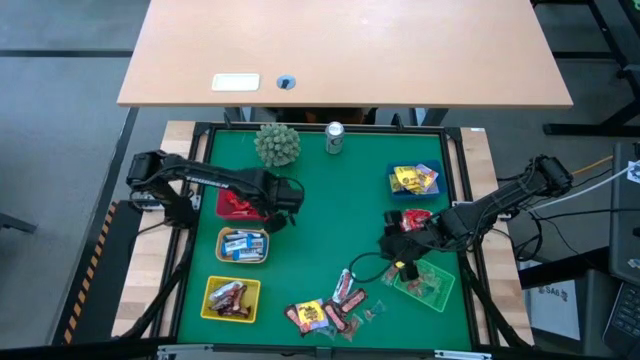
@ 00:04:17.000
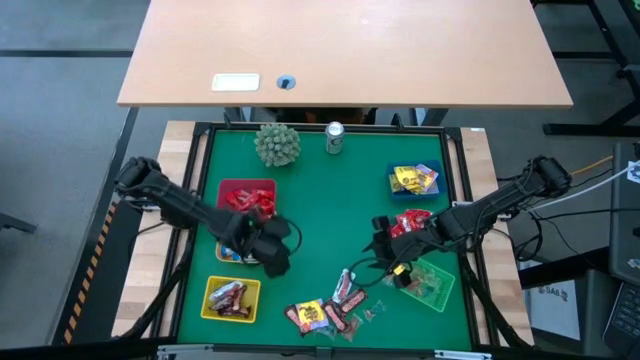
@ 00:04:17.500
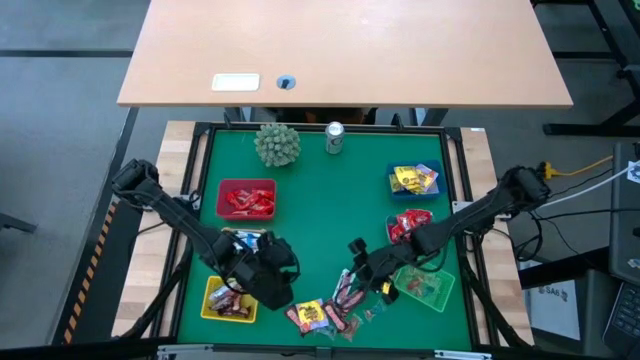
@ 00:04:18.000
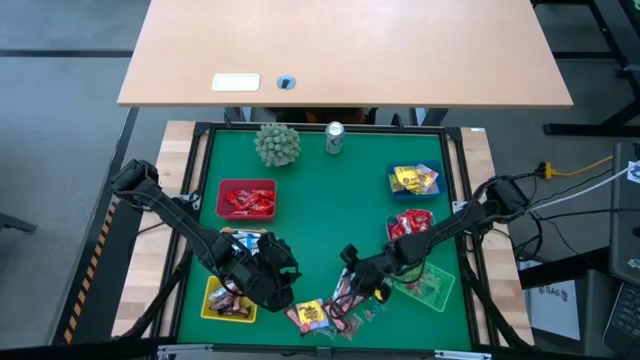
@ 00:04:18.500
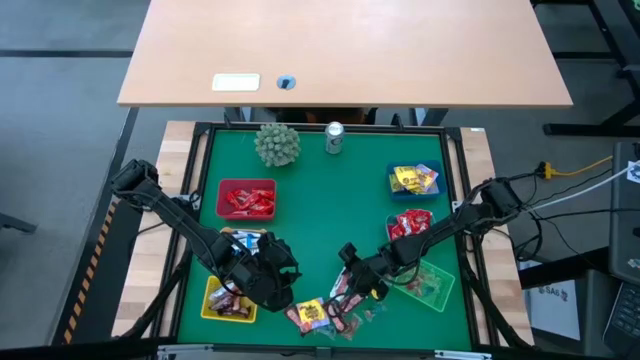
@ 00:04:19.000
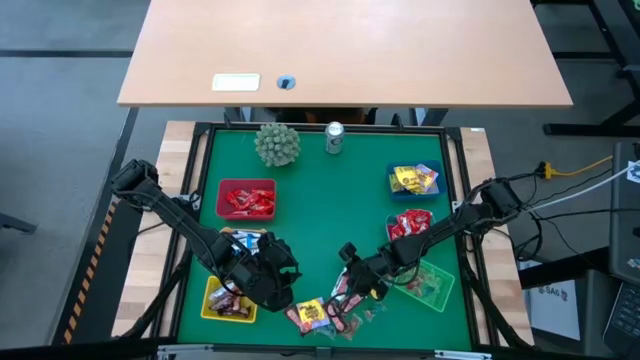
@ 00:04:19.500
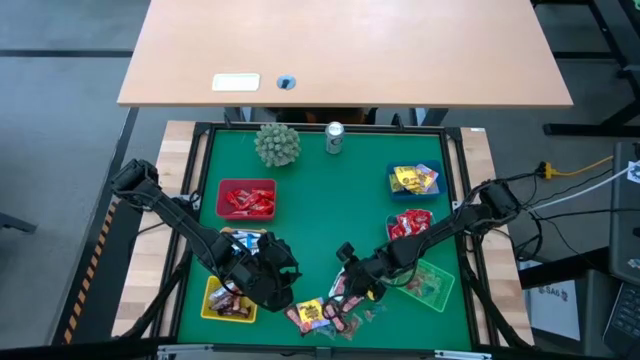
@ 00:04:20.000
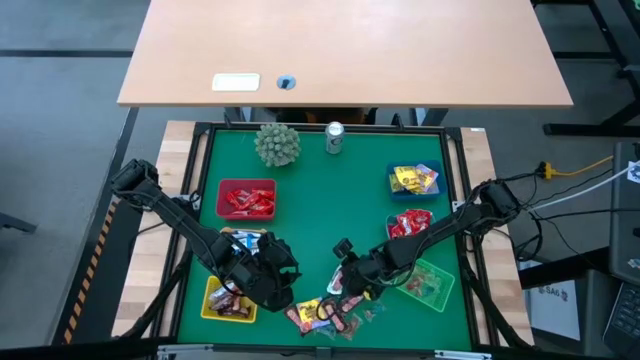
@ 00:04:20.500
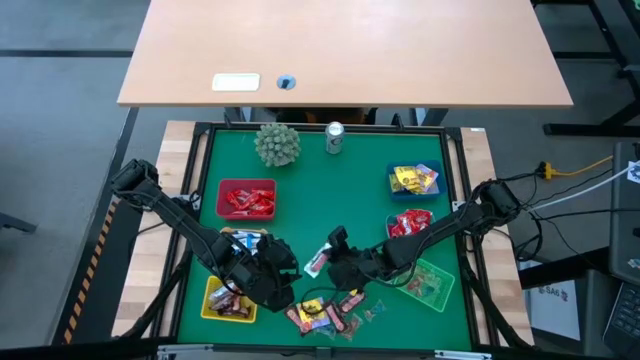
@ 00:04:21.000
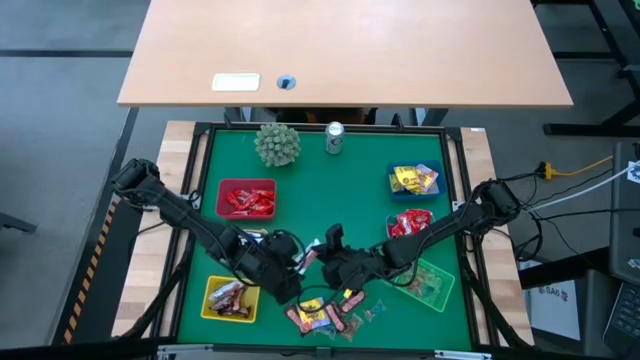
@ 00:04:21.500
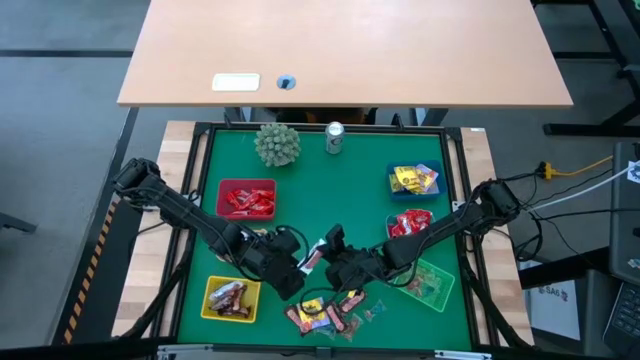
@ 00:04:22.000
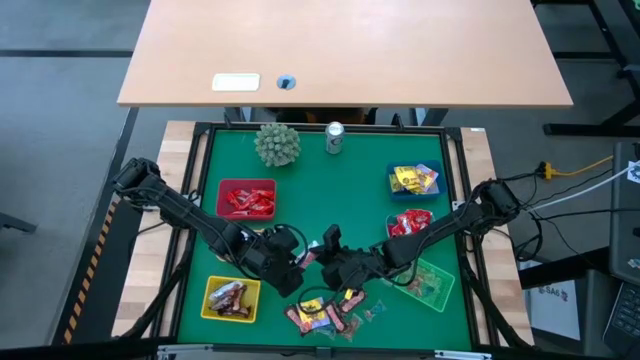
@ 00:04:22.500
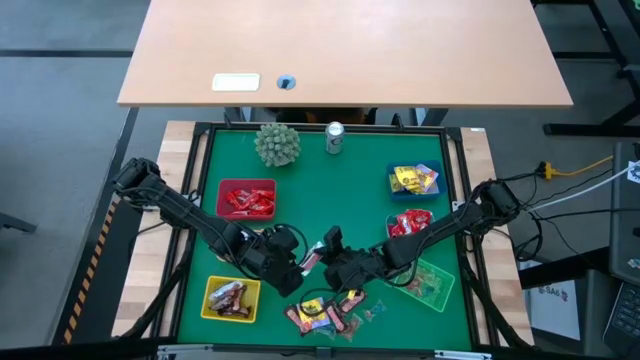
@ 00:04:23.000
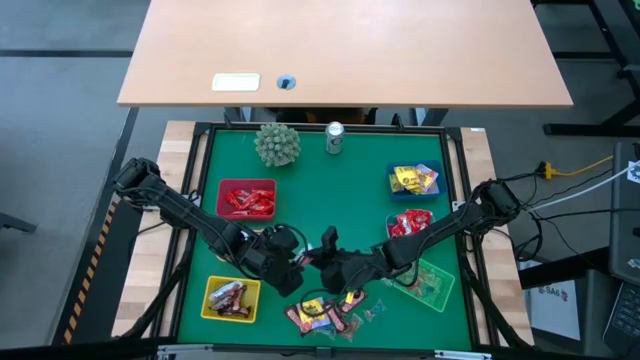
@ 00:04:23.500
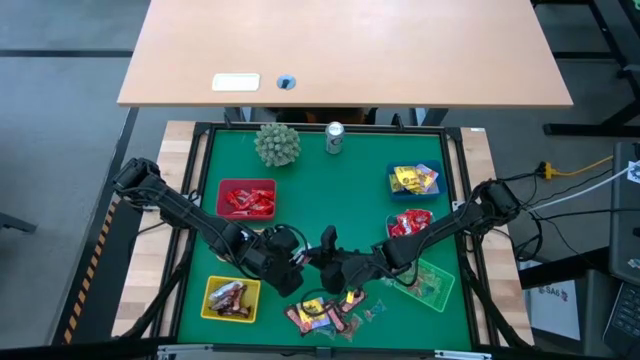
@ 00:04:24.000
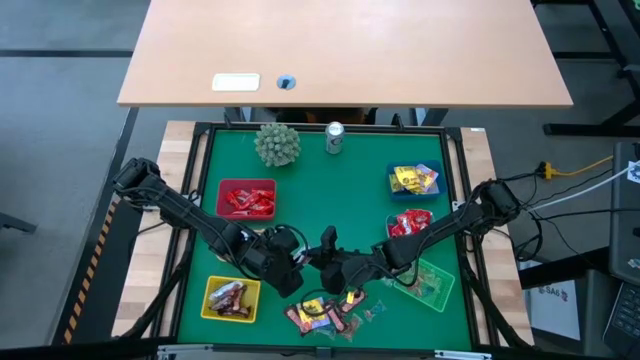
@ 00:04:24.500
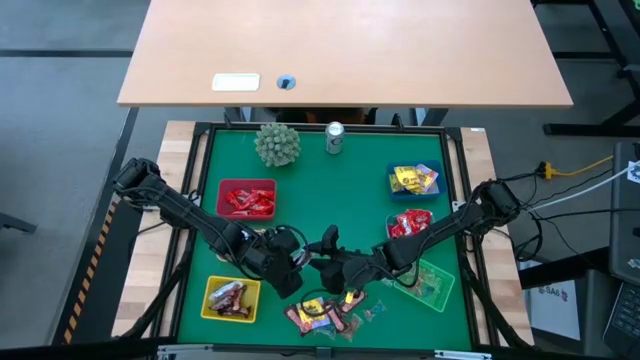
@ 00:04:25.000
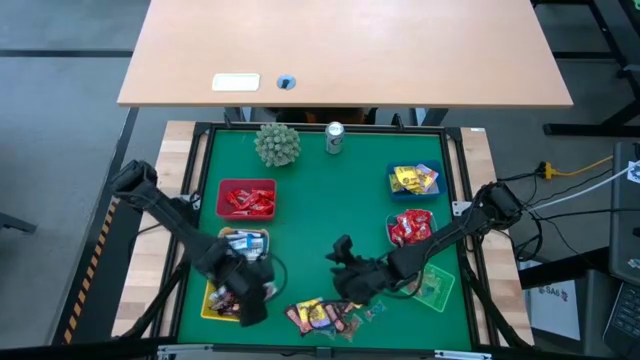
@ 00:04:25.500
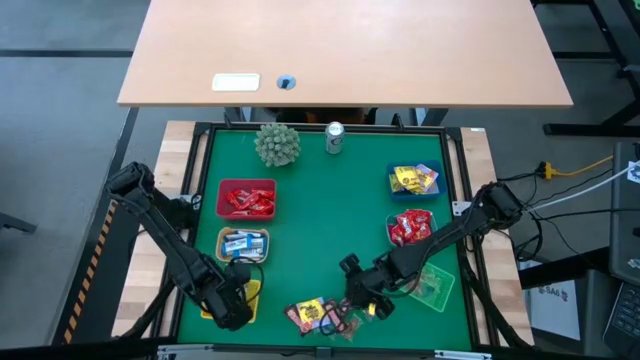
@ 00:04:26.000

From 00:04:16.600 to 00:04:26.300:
Task: Sort candy
Put the white-red chocolate bar into the yellow bin

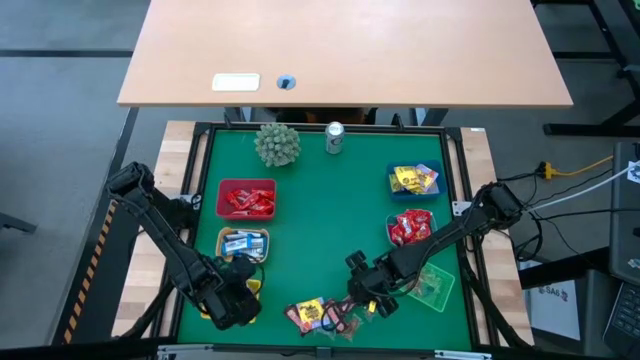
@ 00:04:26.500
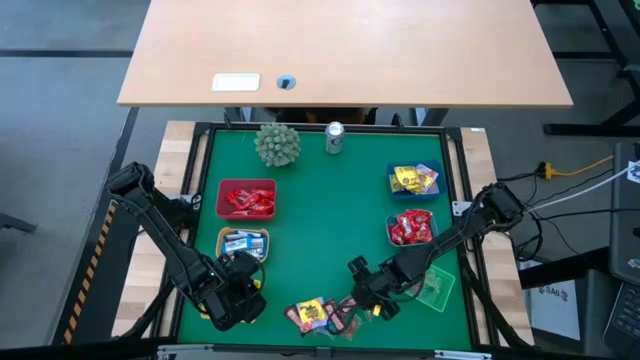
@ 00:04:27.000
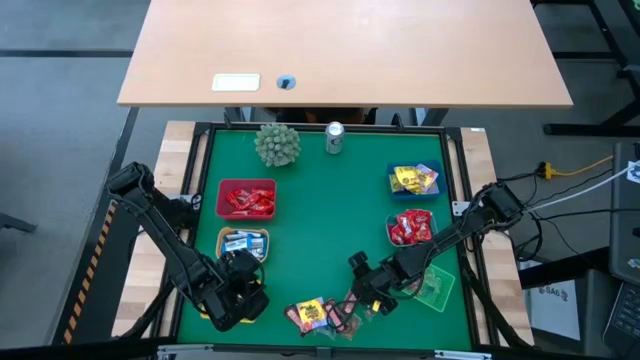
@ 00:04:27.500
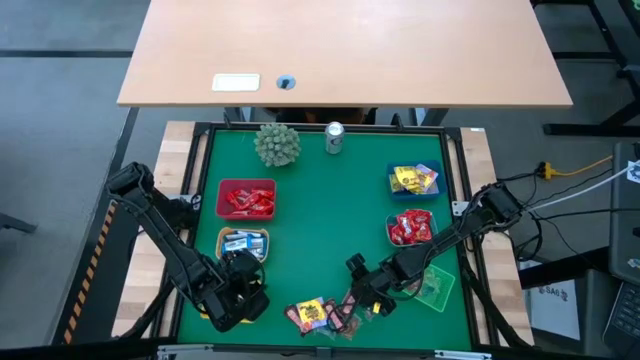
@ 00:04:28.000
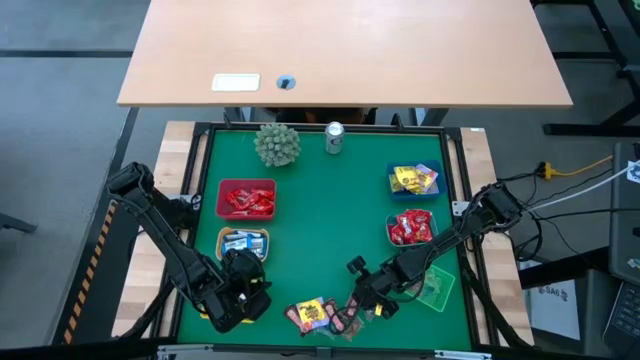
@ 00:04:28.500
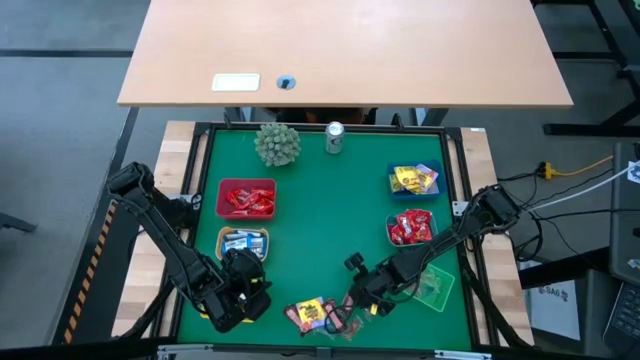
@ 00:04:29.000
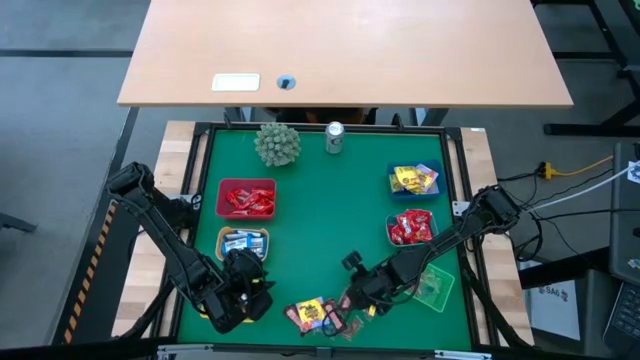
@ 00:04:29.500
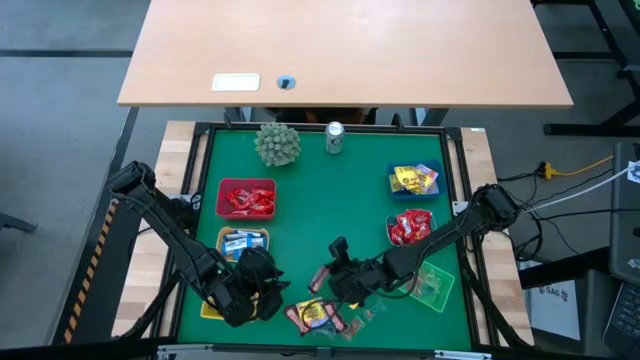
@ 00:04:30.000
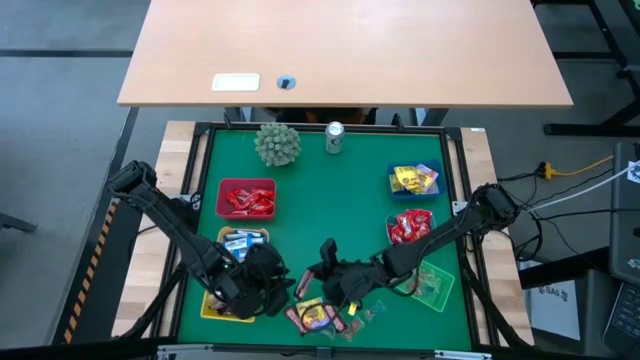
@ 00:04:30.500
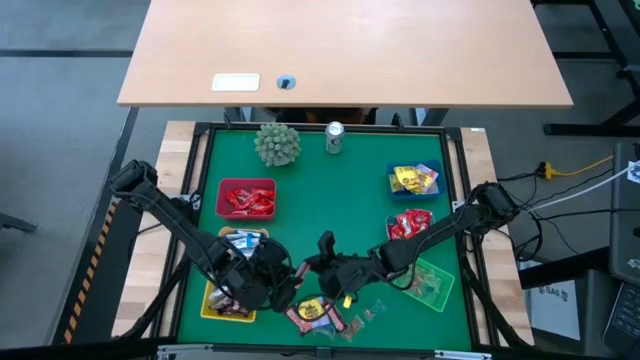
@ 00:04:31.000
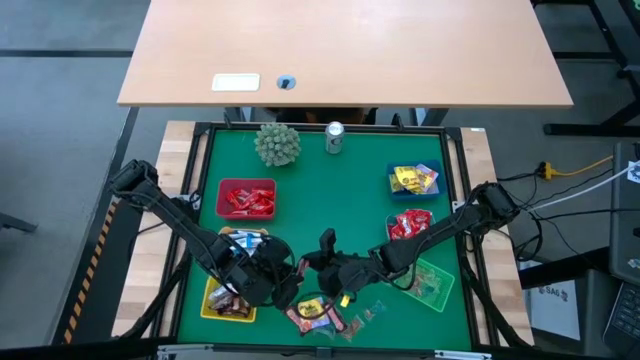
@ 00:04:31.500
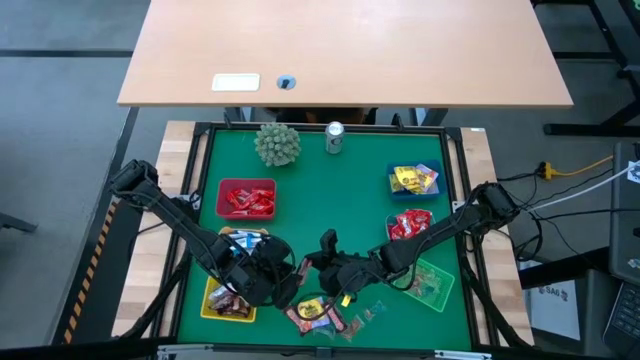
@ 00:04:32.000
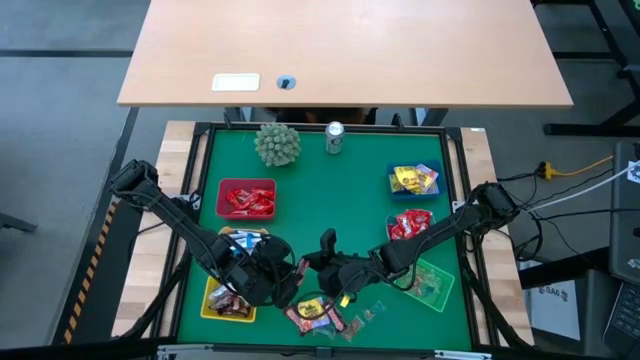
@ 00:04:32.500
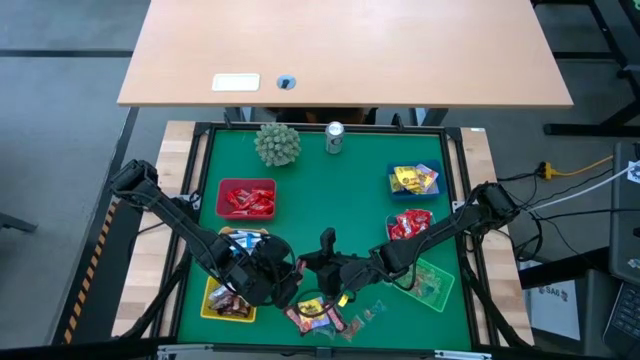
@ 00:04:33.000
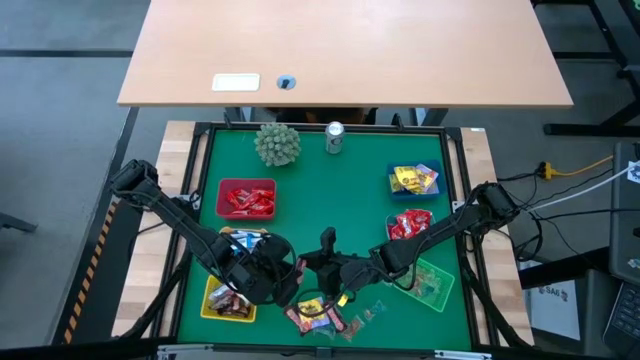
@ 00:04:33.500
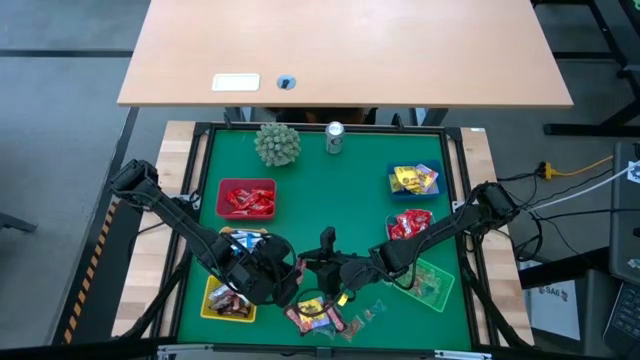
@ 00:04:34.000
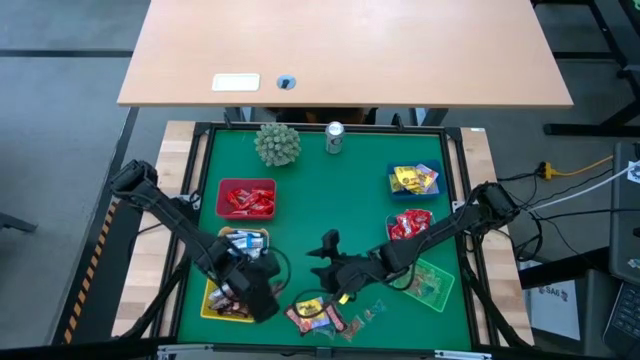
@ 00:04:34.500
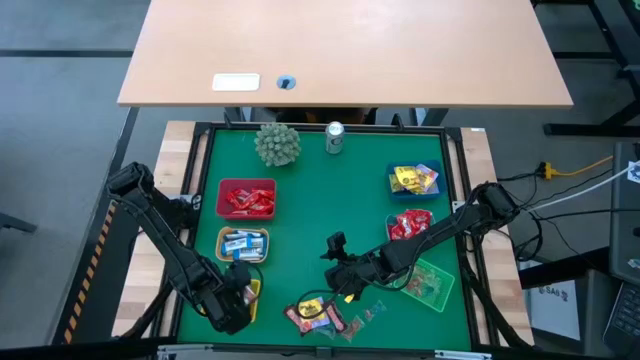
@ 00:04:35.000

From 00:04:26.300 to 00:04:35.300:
Put the brown chocolate bar into the yellow bin

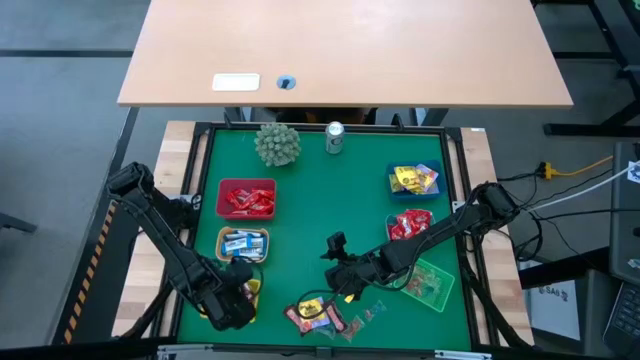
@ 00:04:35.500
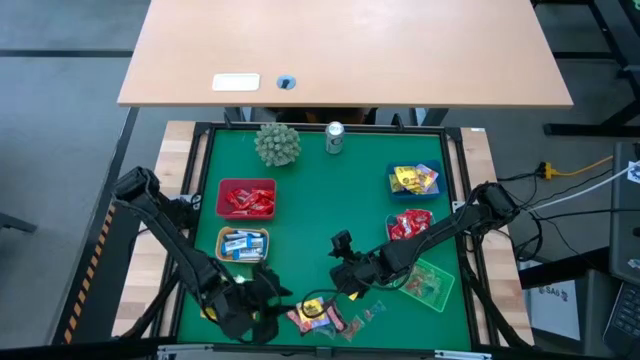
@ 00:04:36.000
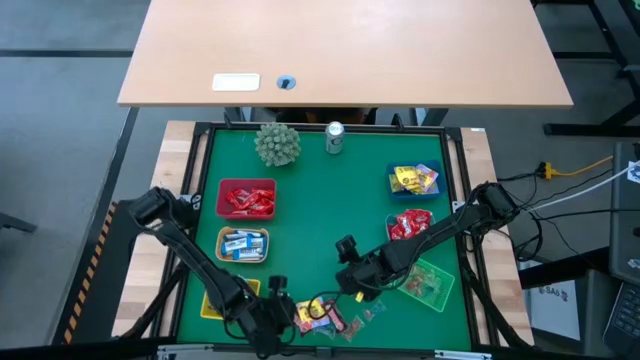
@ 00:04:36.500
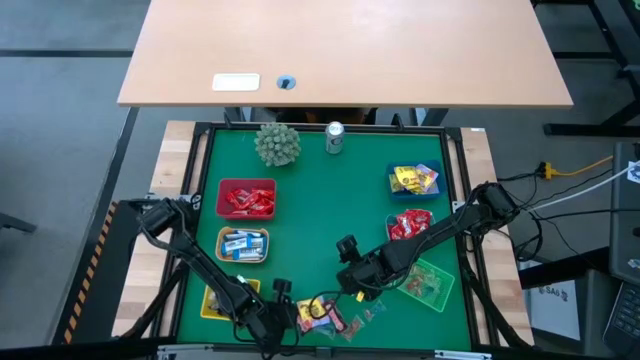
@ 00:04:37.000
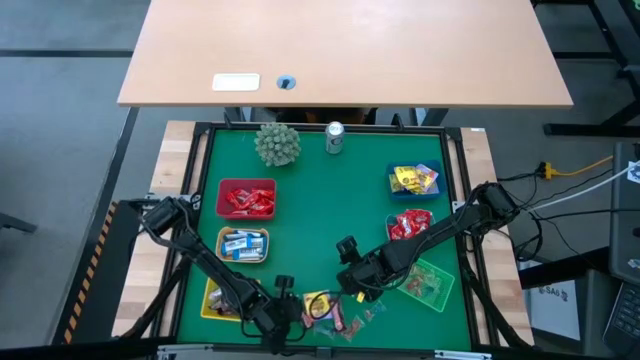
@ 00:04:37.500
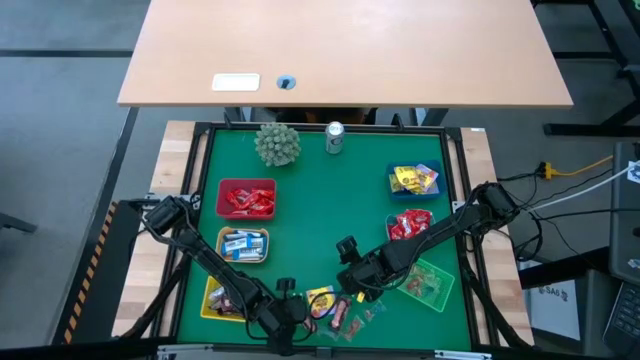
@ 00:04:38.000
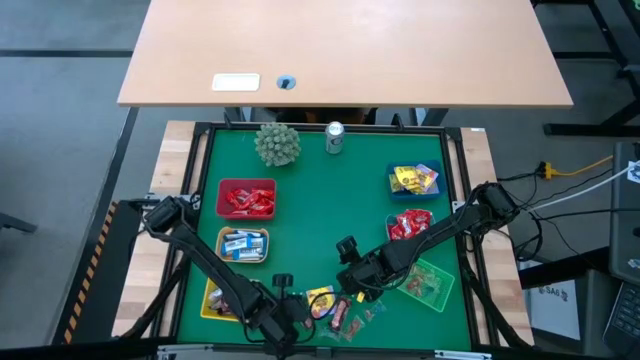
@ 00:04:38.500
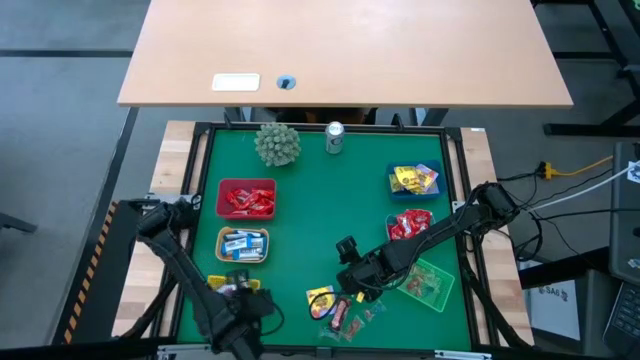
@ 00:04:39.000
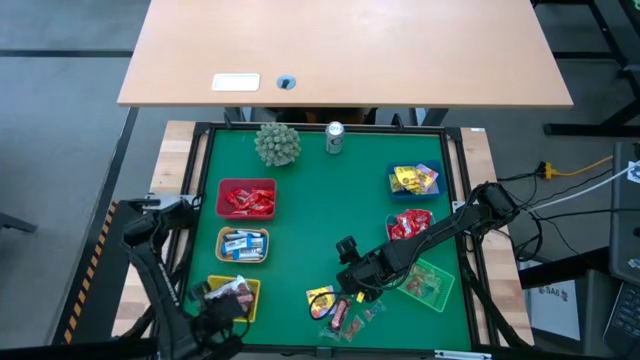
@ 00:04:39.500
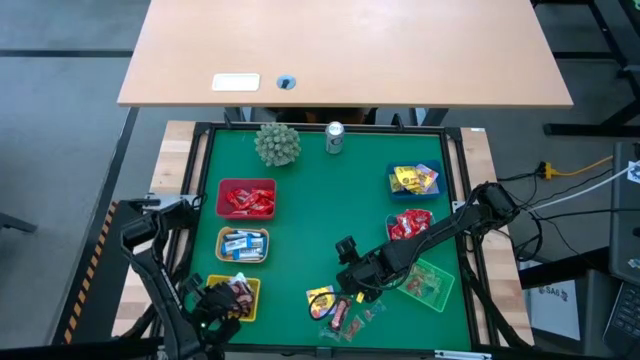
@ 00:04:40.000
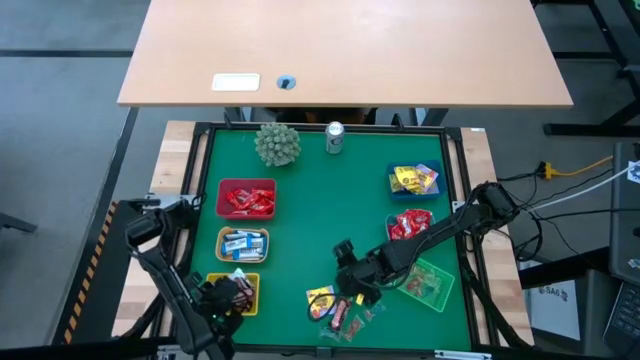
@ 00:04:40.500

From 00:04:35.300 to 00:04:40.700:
Put the brown chocolate bar into the yellow bin
